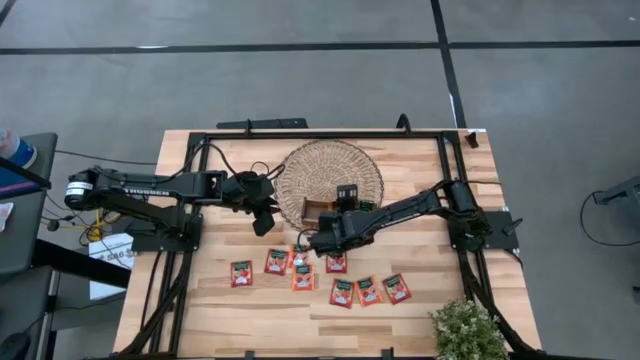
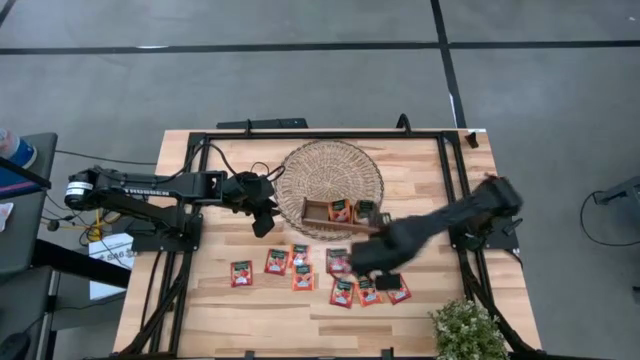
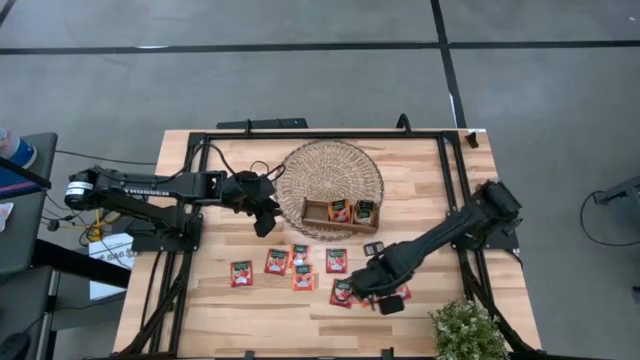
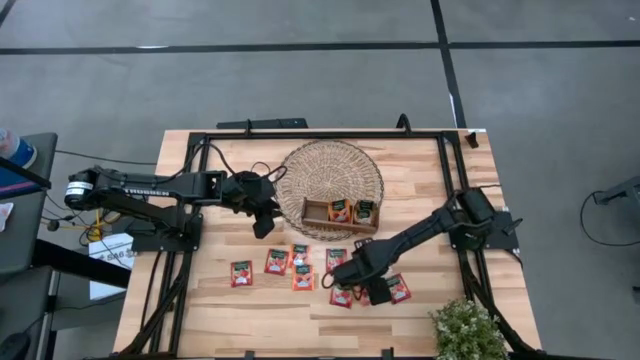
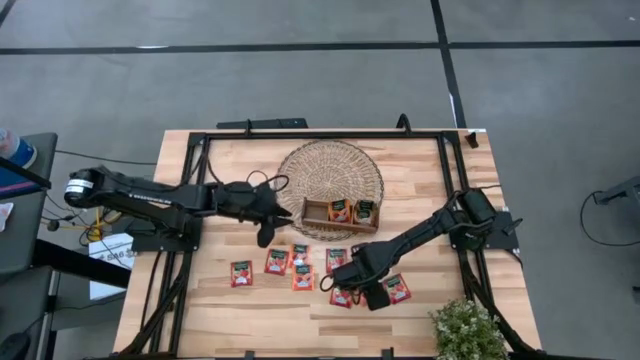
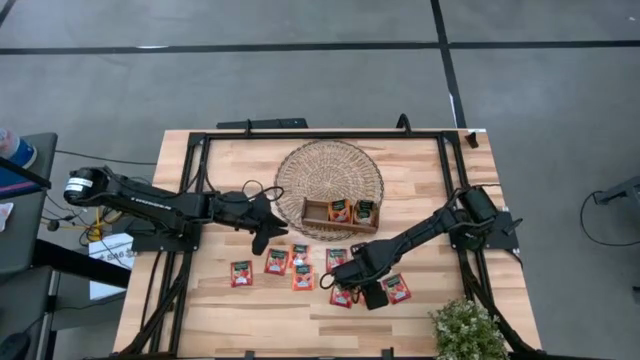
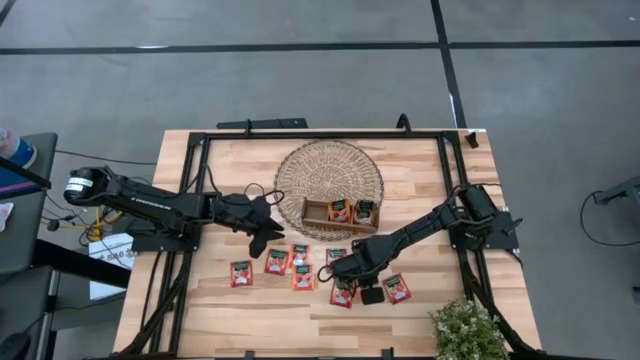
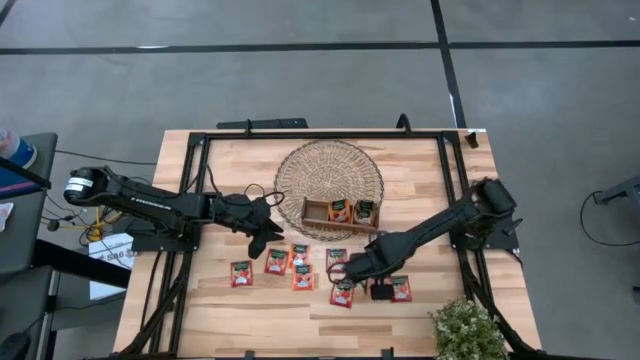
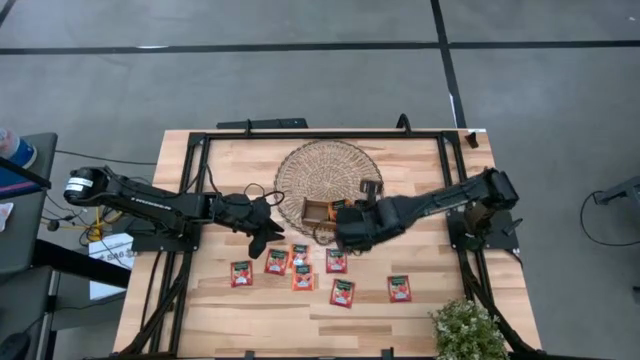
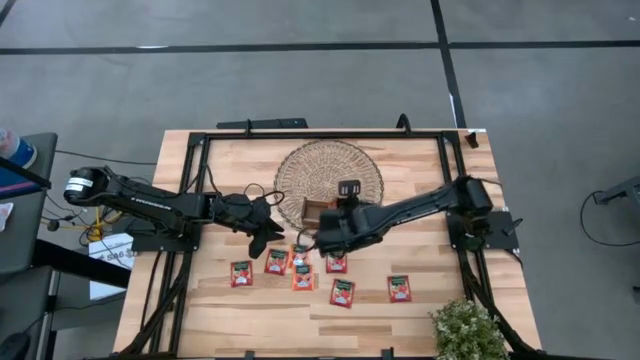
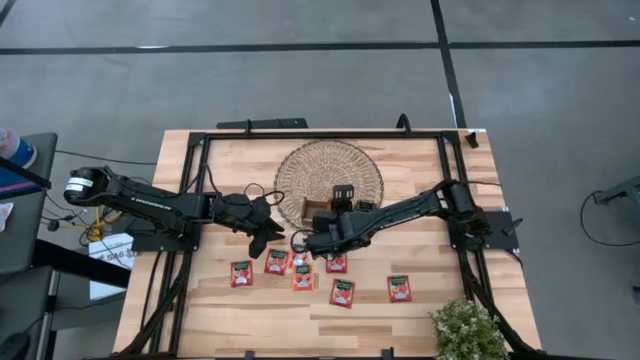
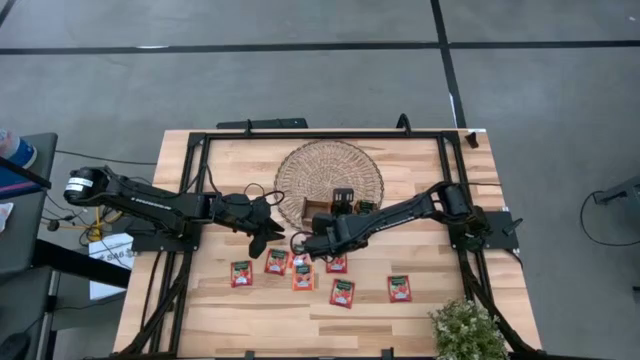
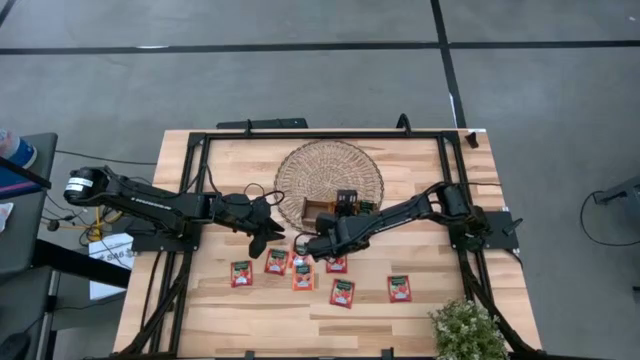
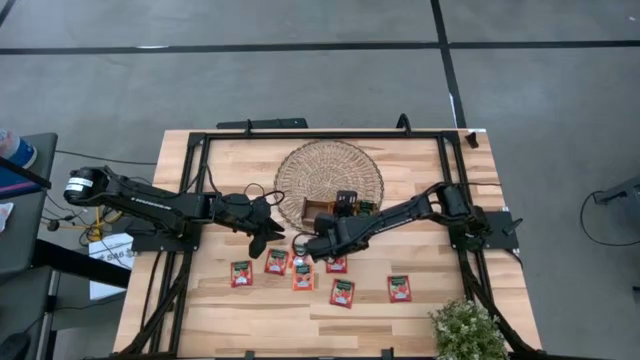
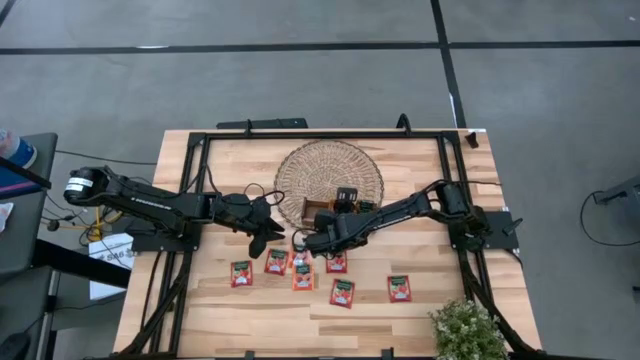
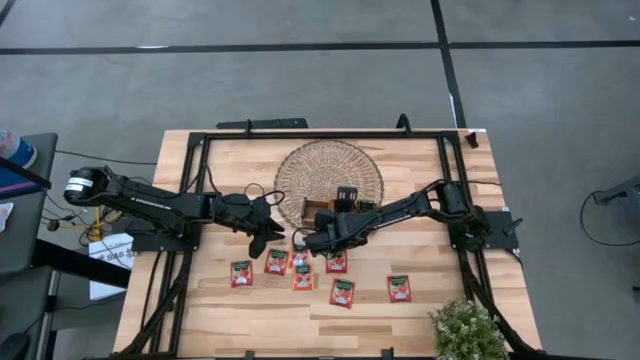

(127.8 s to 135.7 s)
Task: Pick & Place Tea
Put the orange tea bag into the middle section of the wooden organizer

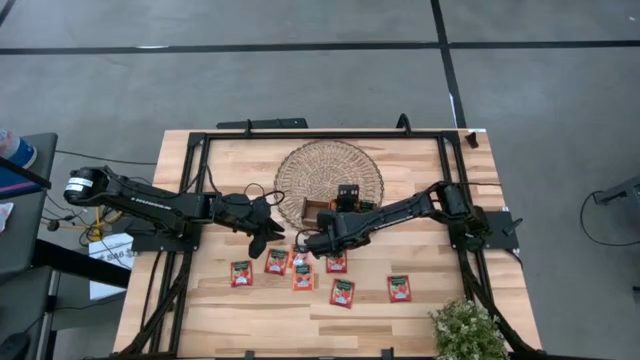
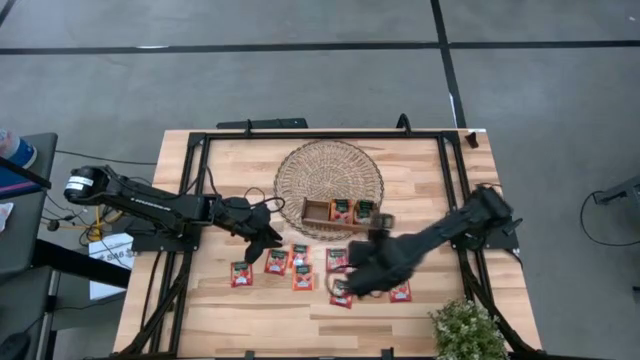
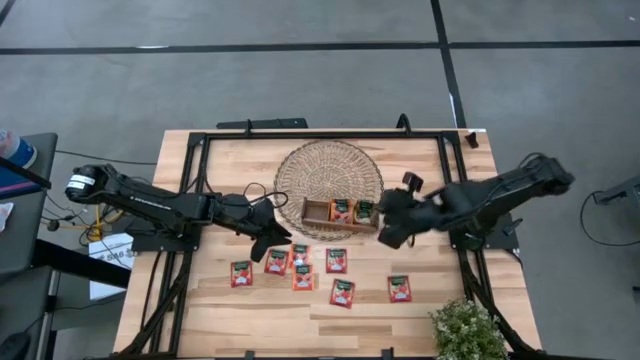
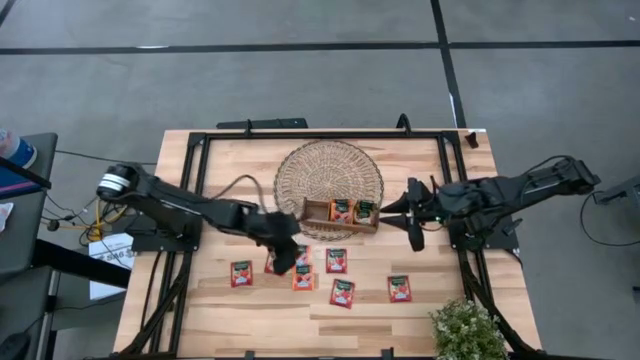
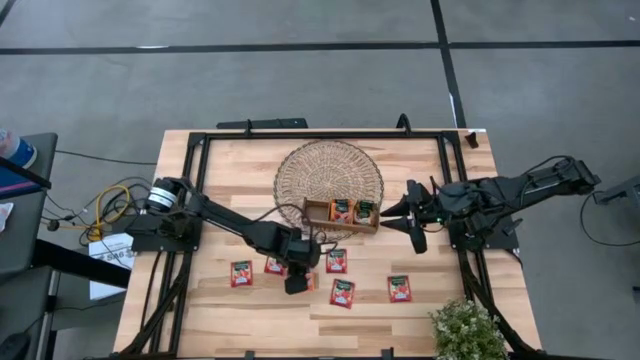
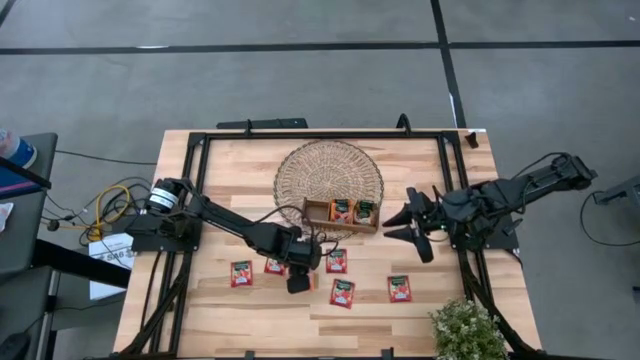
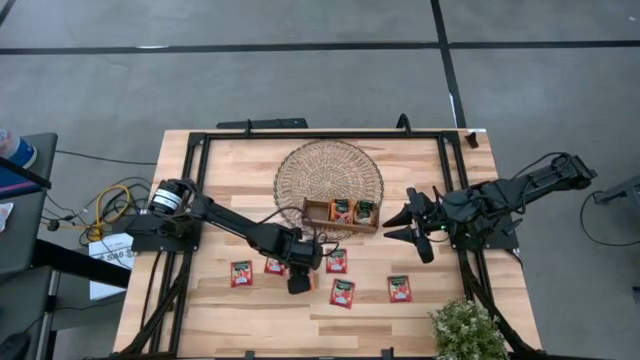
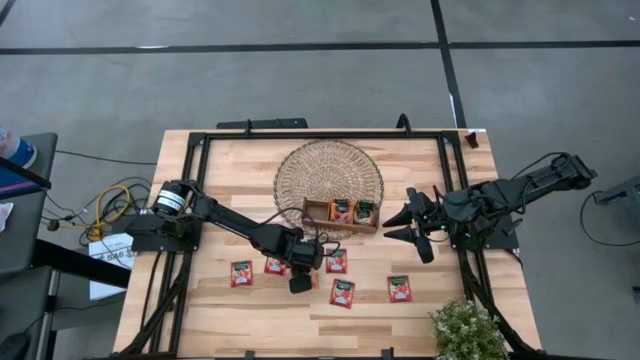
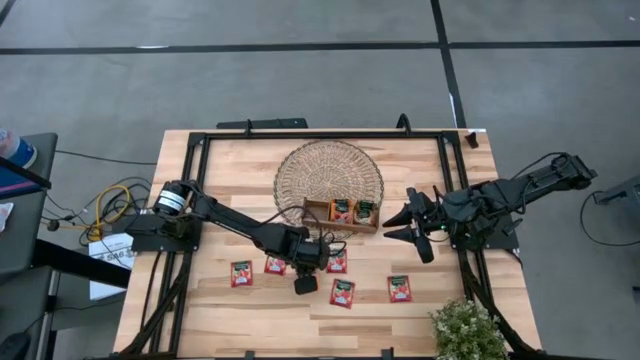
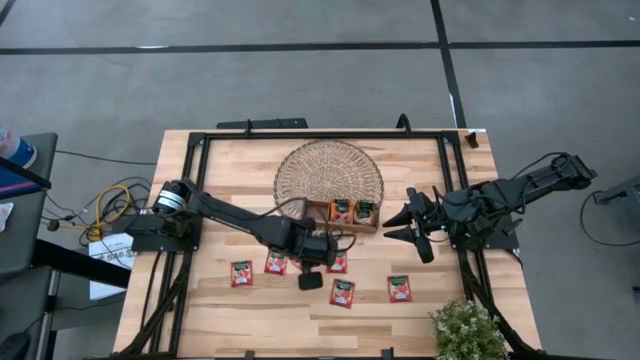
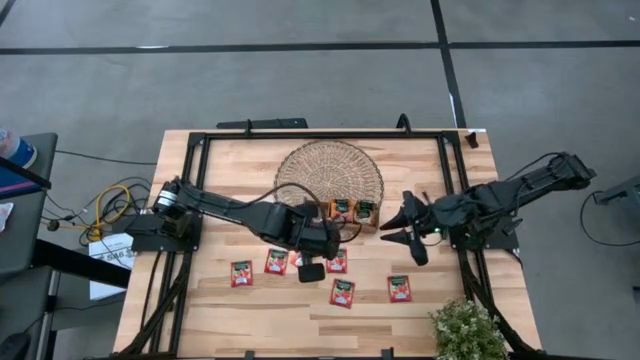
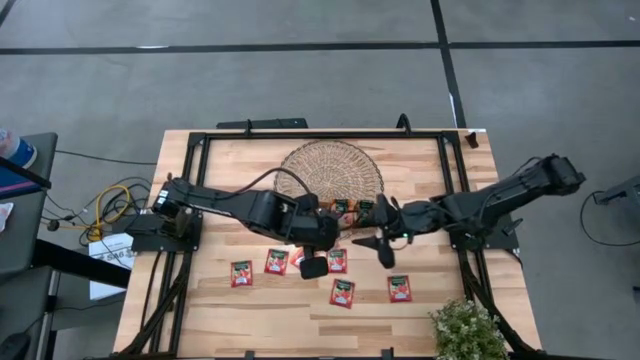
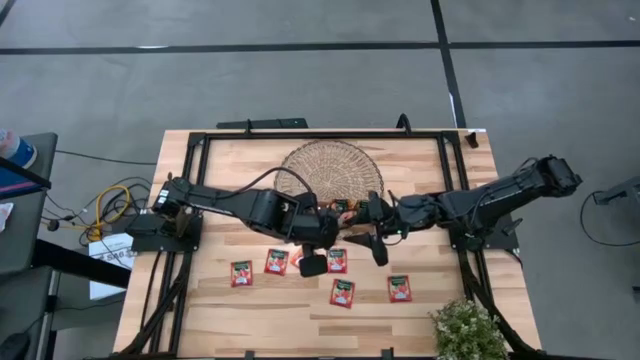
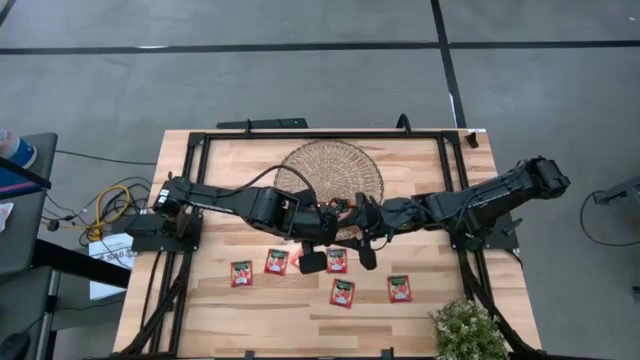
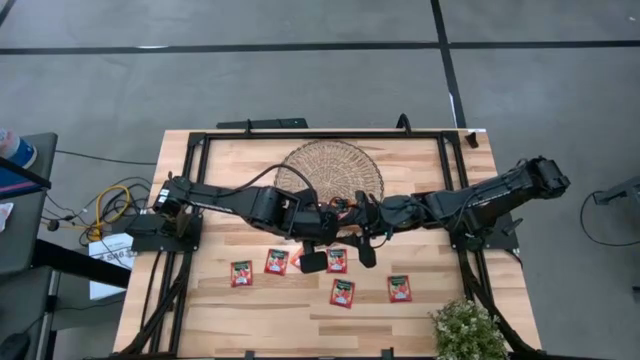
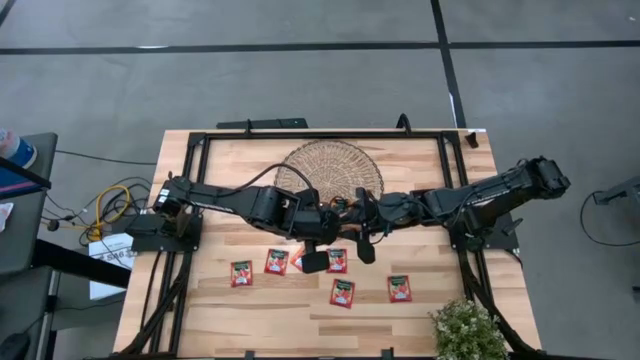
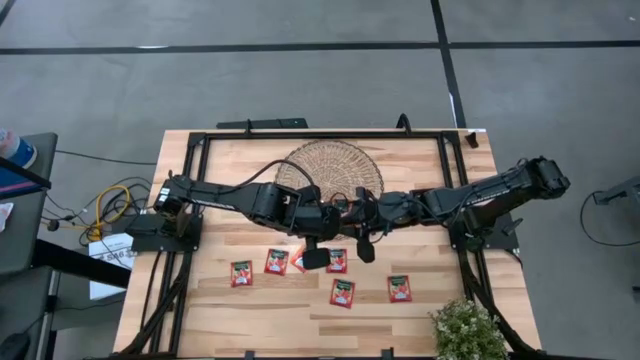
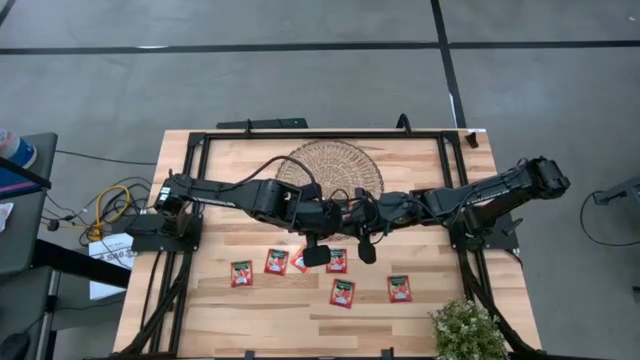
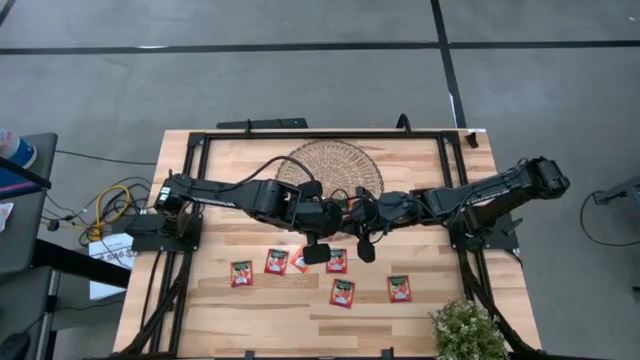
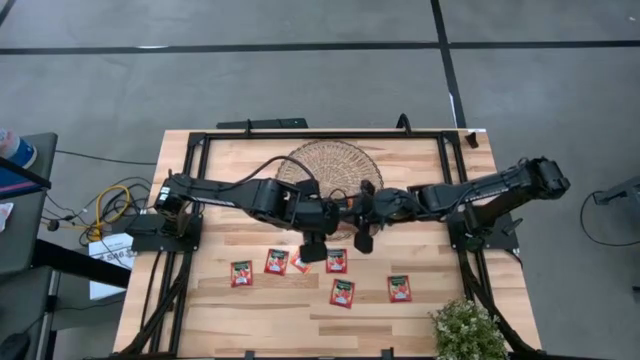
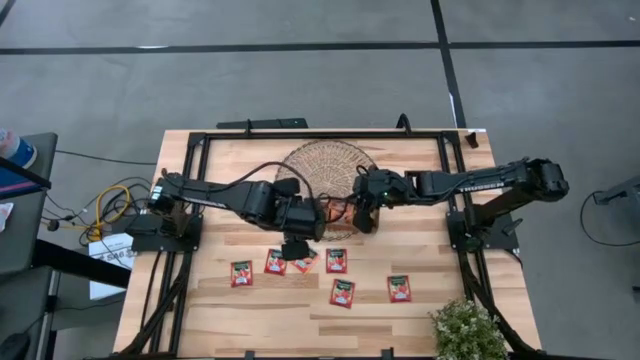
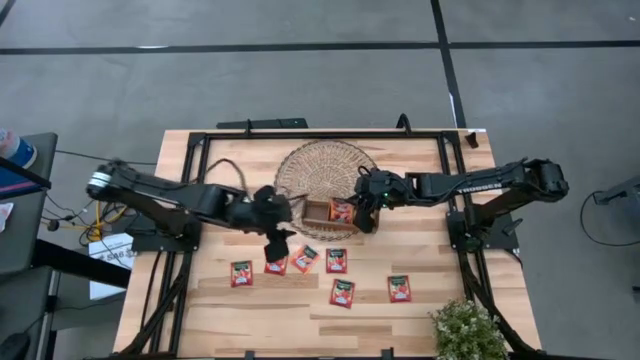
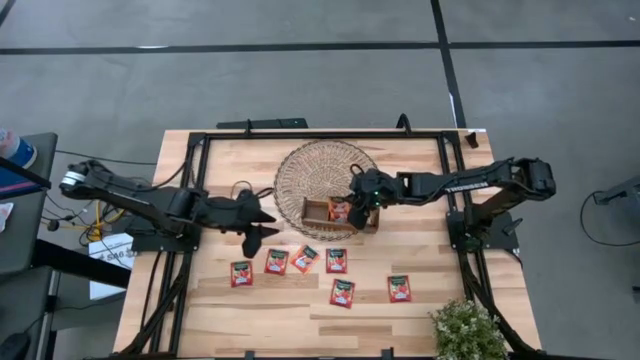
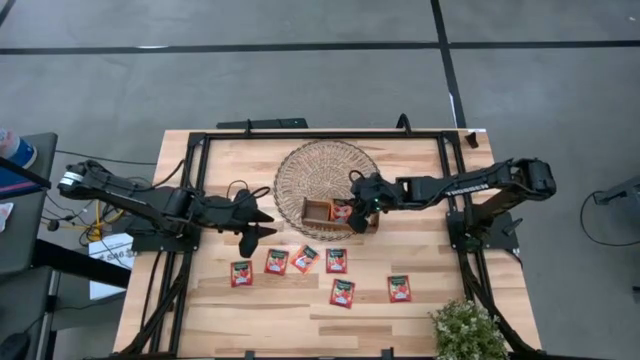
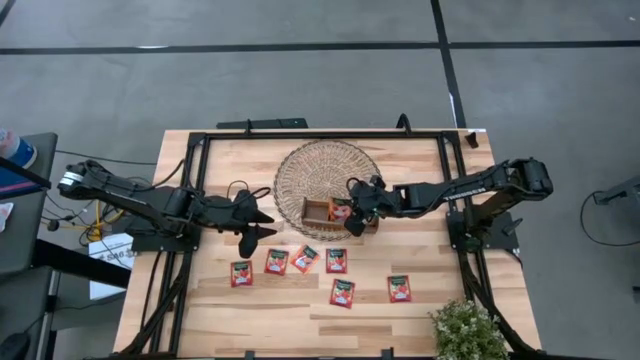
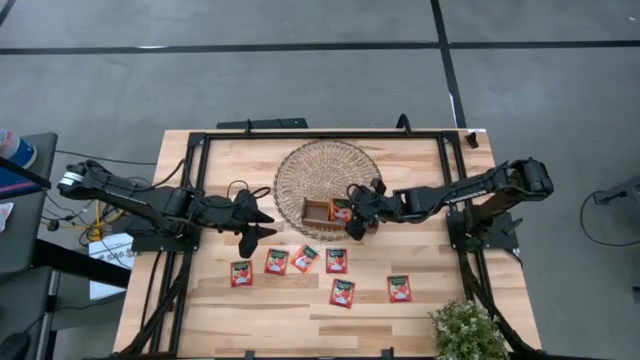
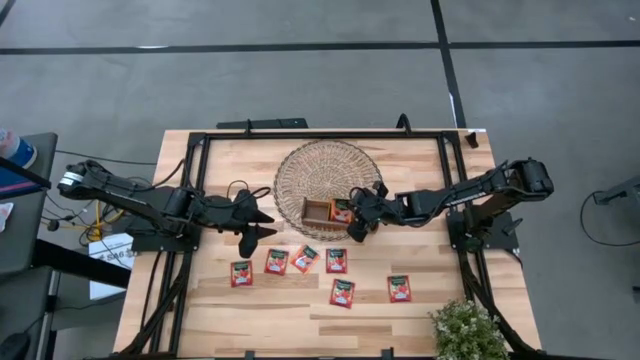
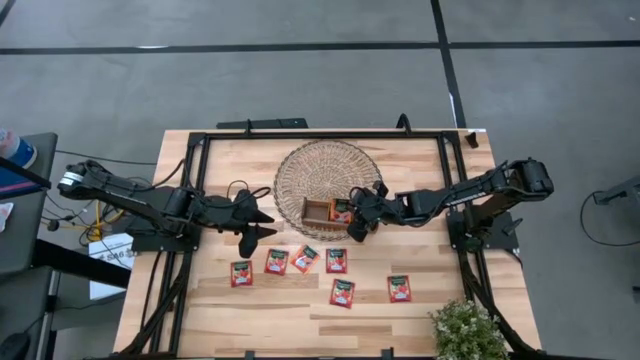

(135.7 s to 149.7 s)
Put the orange tea bag into the middle section of the wooden organizer

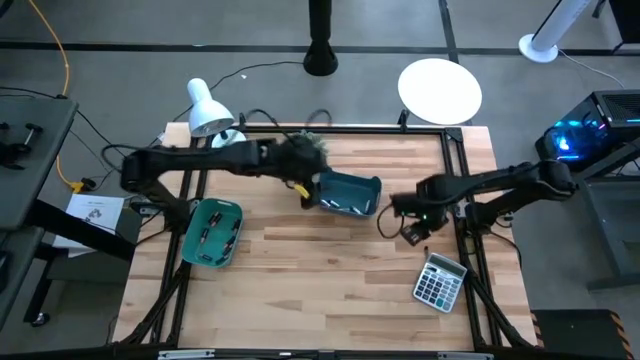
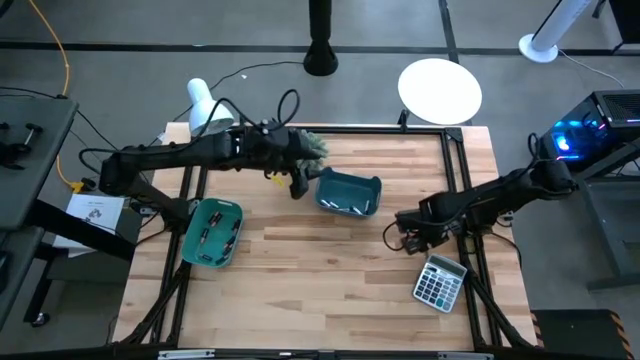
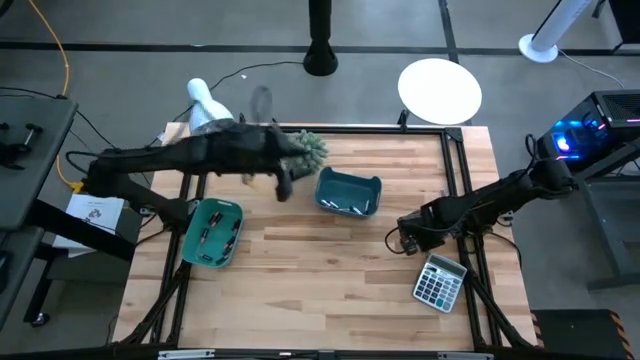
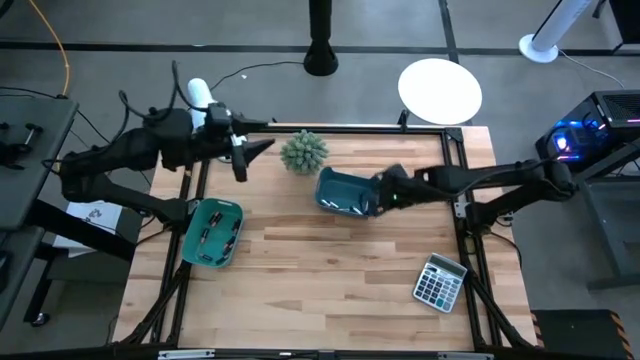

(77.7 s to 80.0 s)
Task: Sort batteries
Put the silver battery into the blue bin
